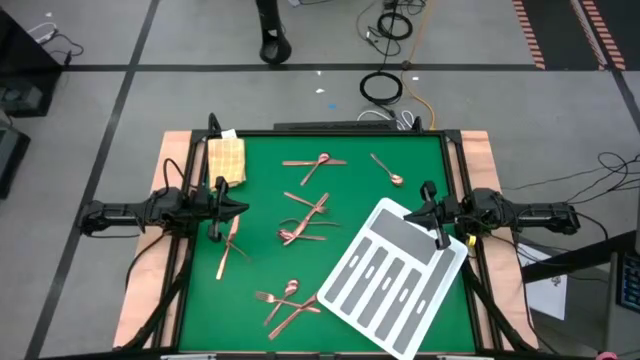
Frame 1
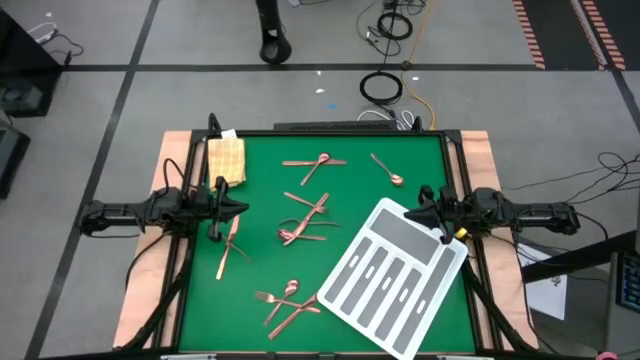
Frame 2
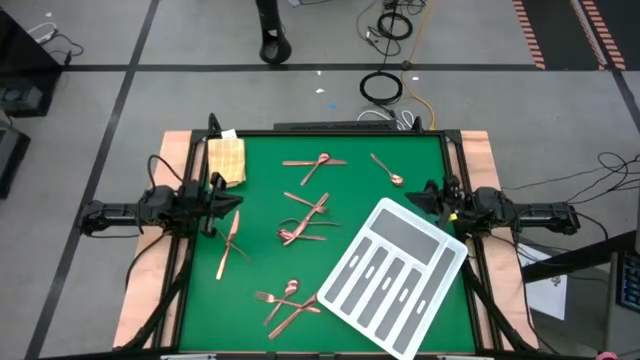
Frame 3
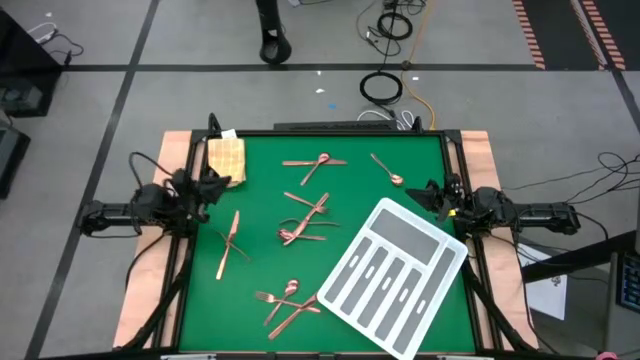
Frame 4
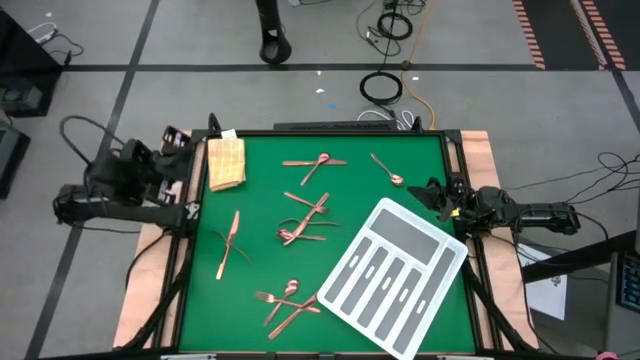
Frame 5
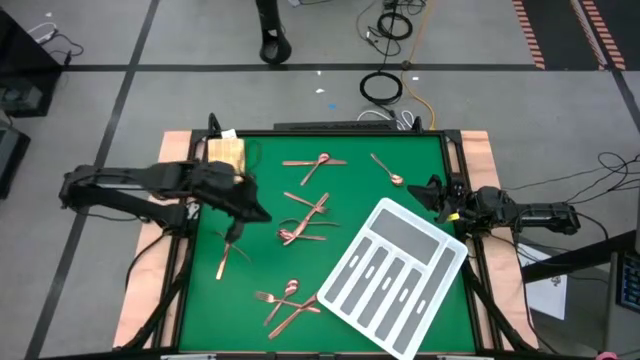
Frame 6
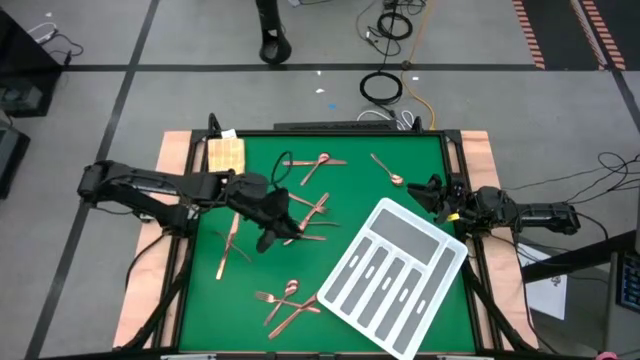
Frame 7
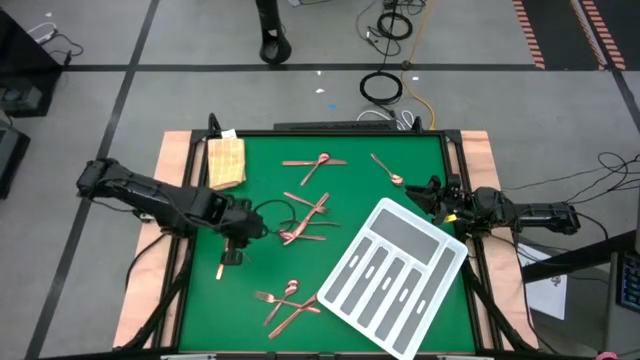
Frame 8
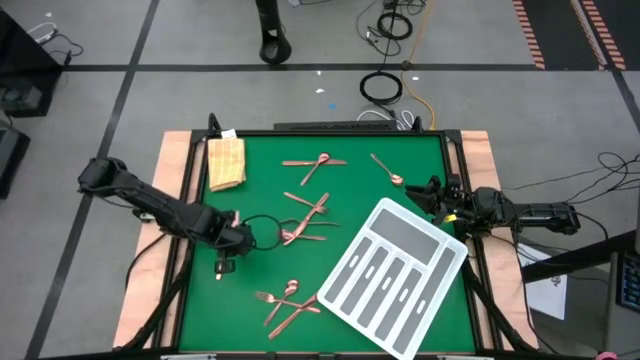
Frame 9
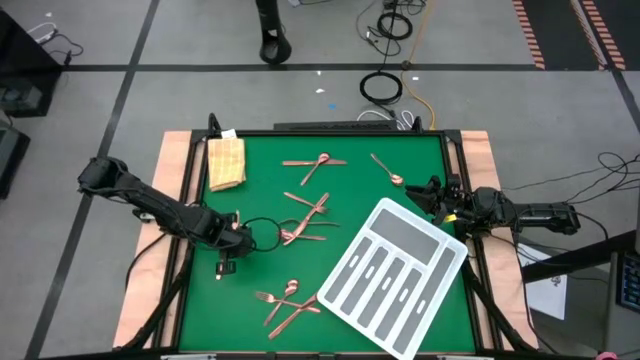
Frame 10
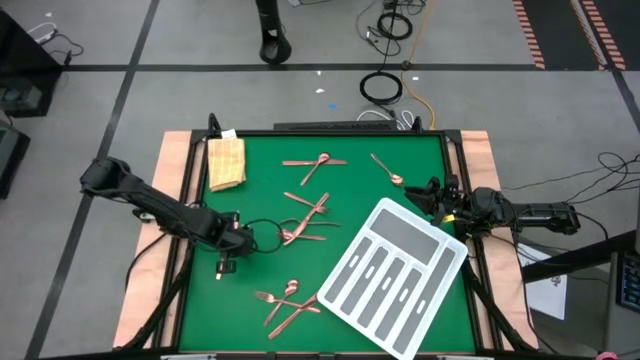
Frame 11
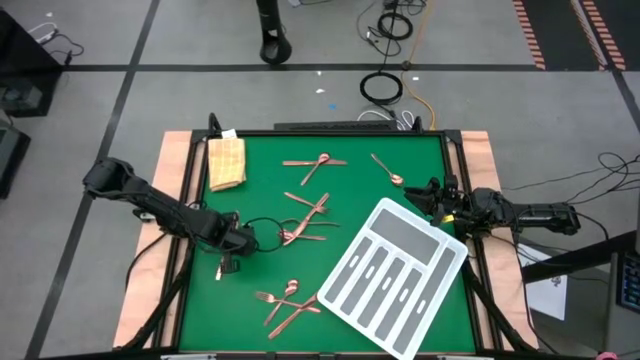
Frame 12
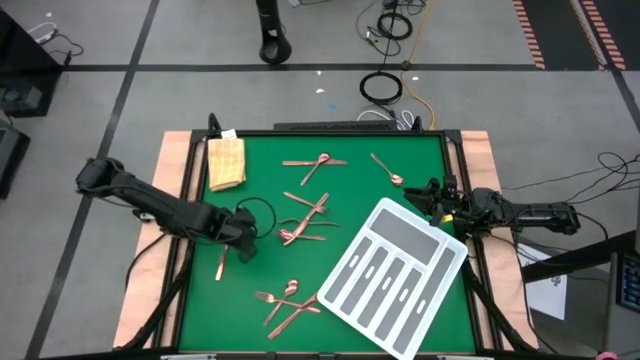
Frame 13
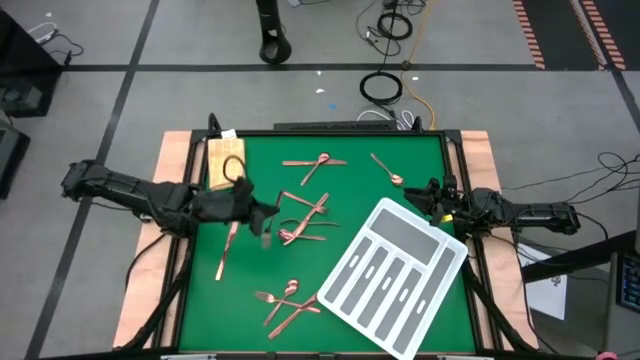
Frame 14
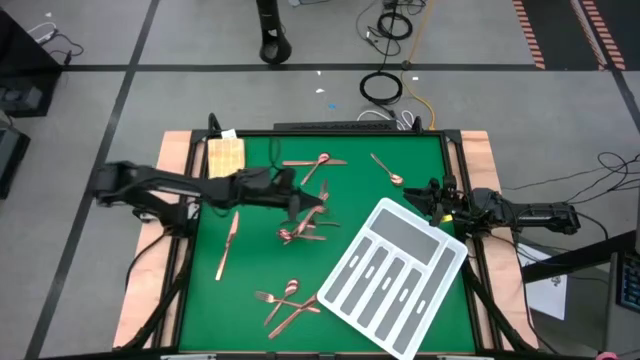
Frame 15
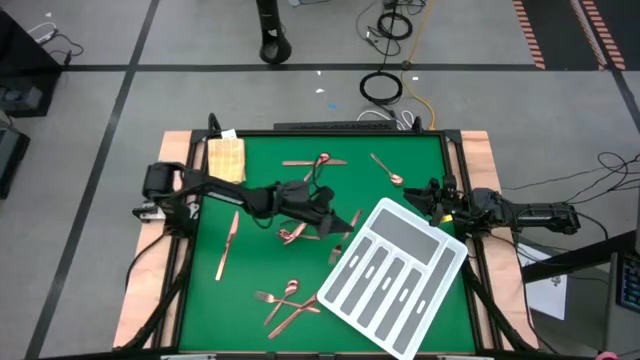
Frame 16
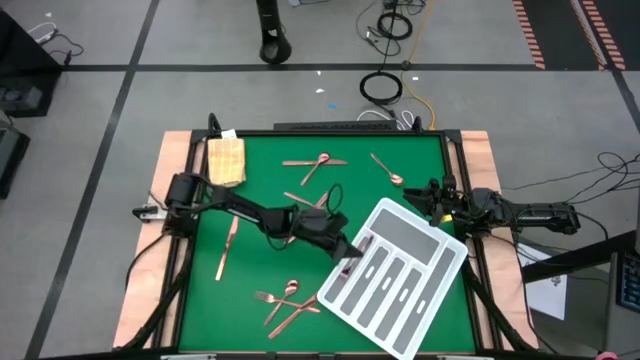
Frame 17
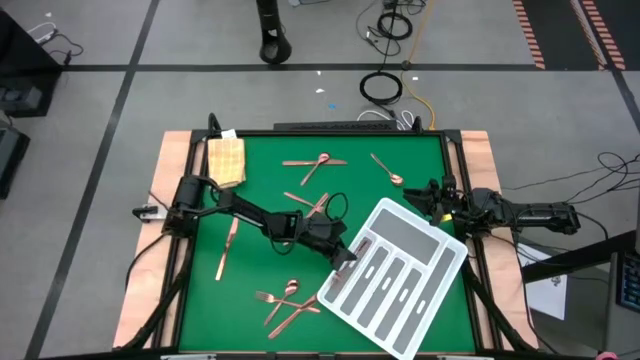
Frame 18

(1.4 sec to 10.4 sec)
Task: Sort silverware
Put the bronze fork into the silverware tray

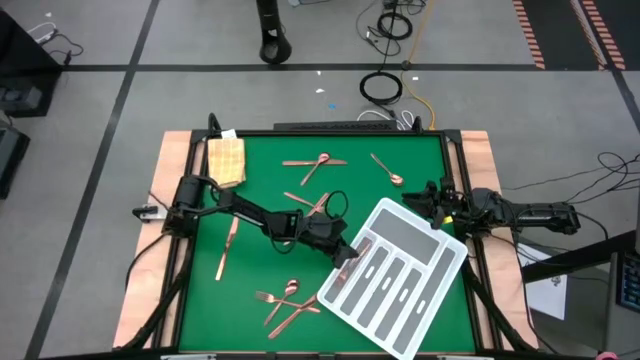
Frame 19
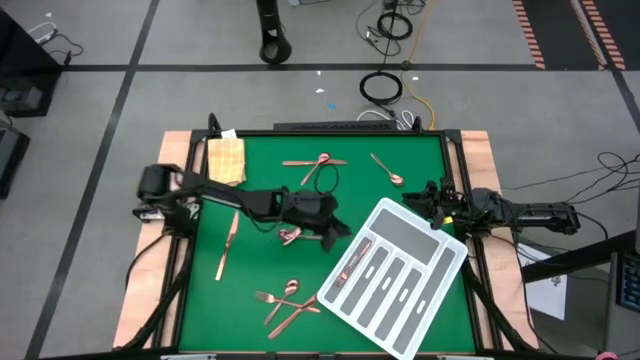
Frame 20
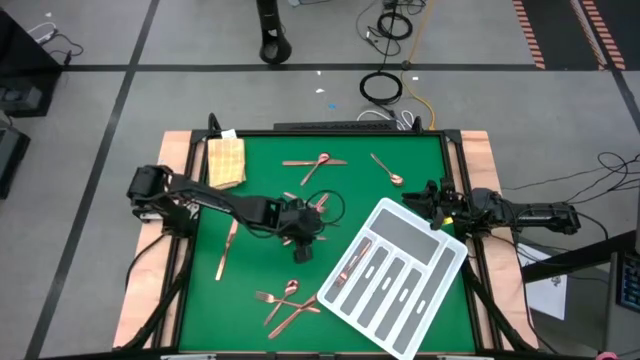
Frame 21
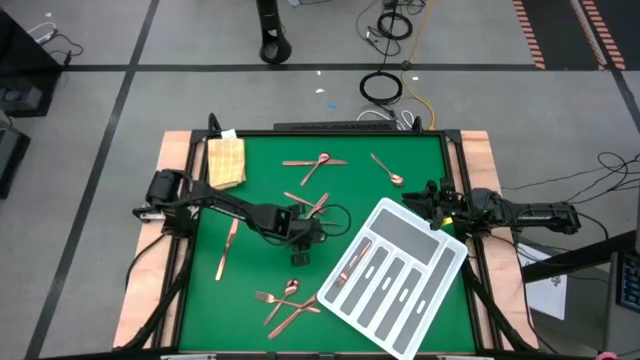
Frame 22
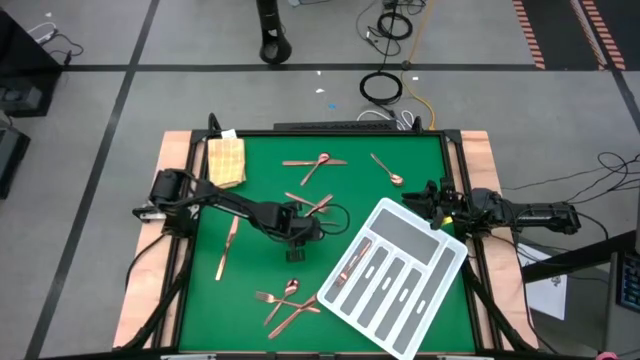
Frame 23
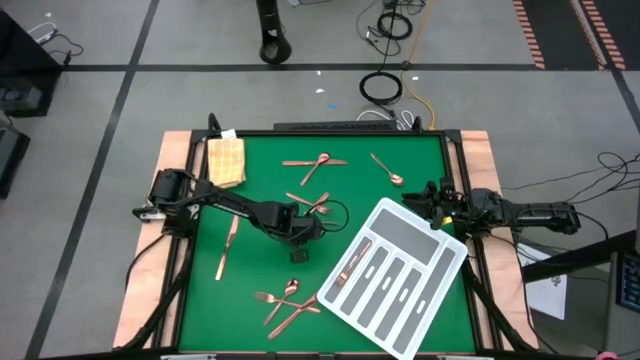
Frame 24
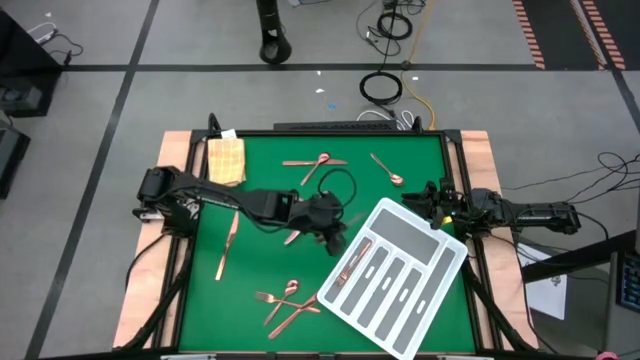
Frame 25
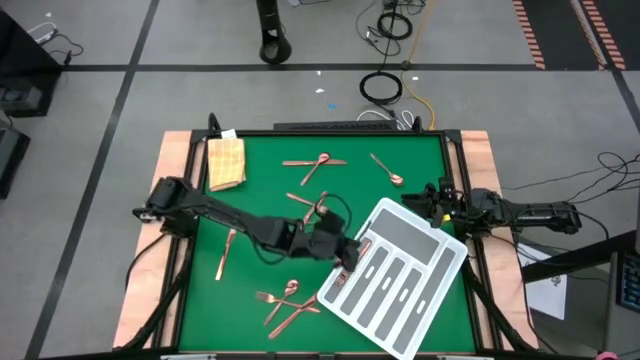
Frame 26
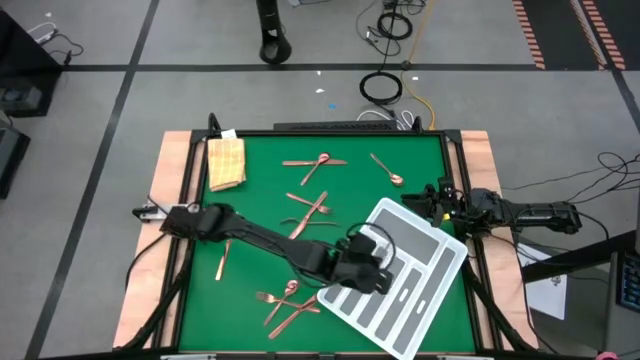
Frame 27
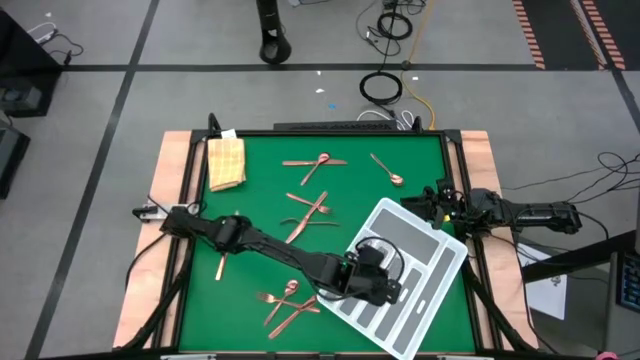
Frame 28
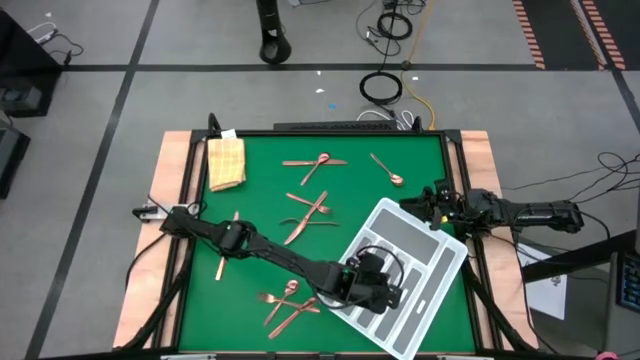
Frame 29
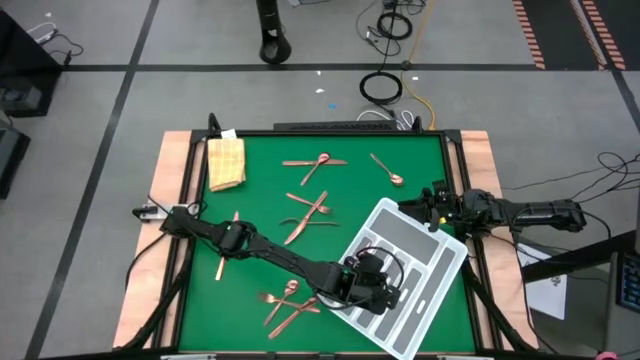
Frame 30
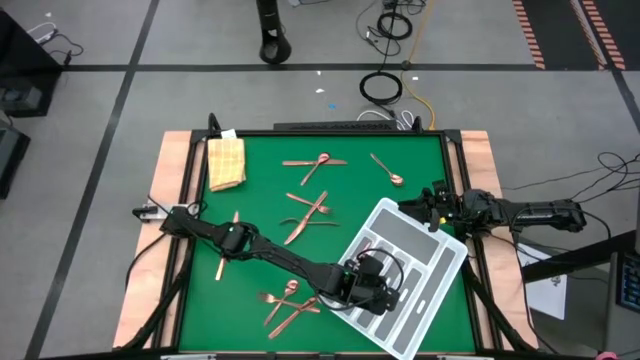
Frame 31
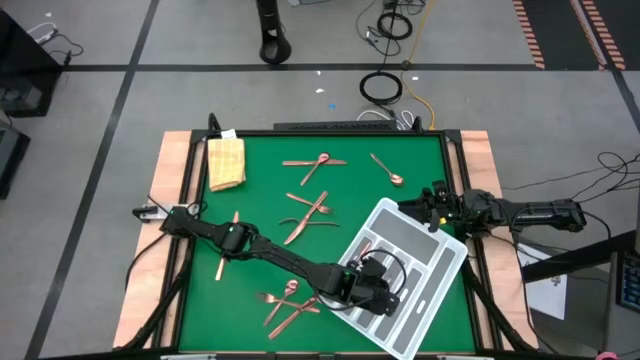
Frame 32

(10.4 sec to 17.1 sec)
Put the bronze spoon into the silverware tray

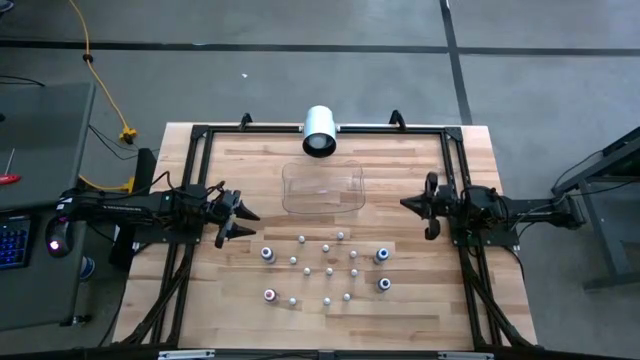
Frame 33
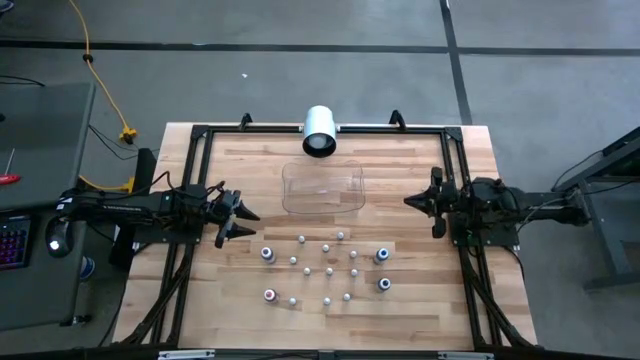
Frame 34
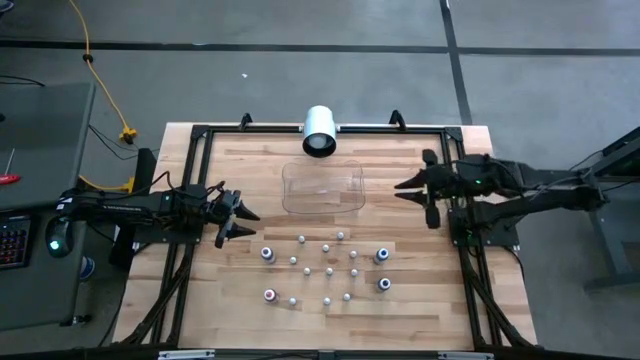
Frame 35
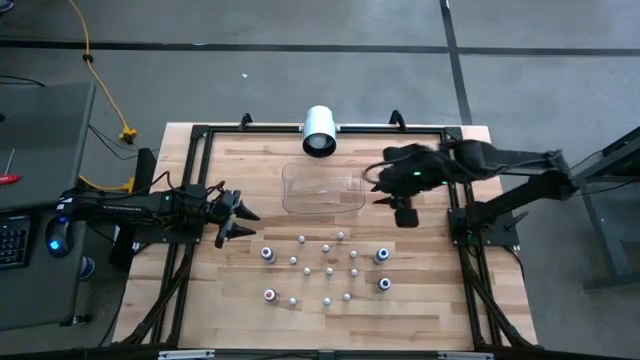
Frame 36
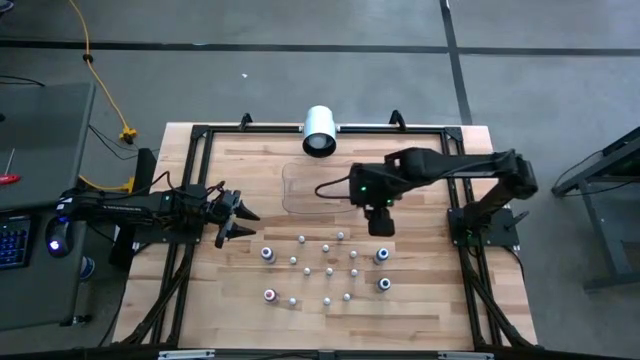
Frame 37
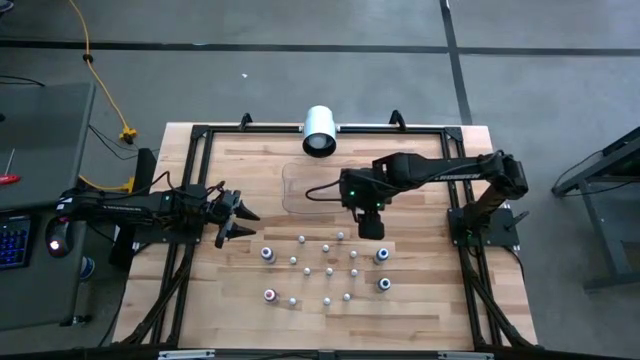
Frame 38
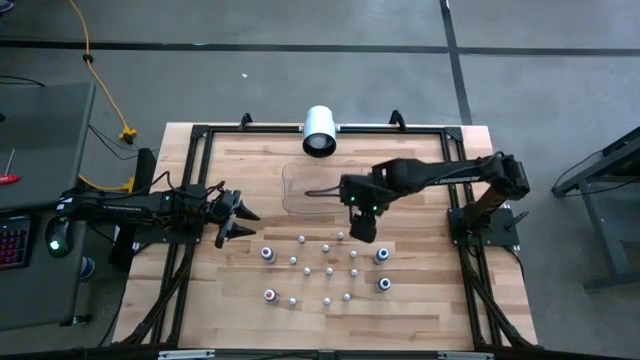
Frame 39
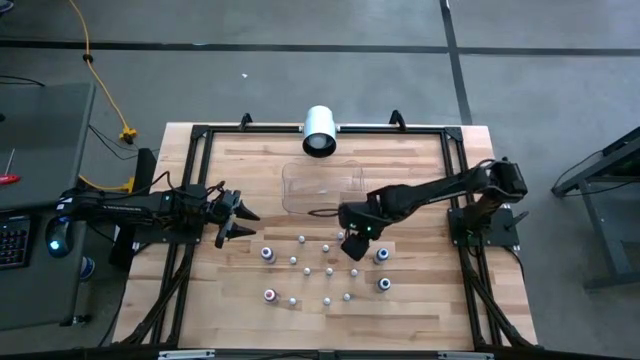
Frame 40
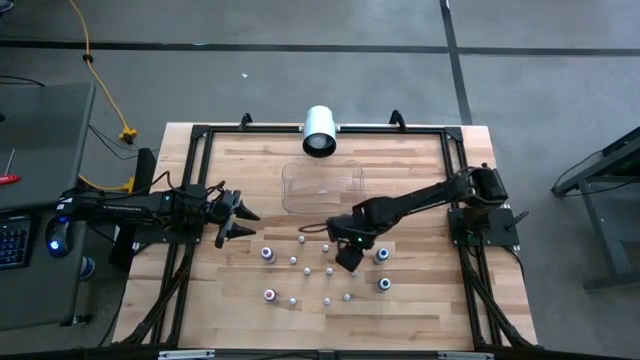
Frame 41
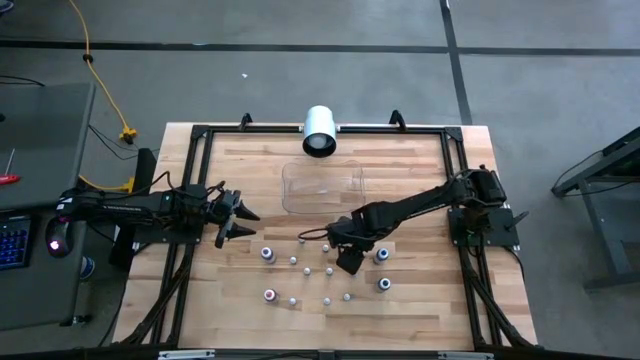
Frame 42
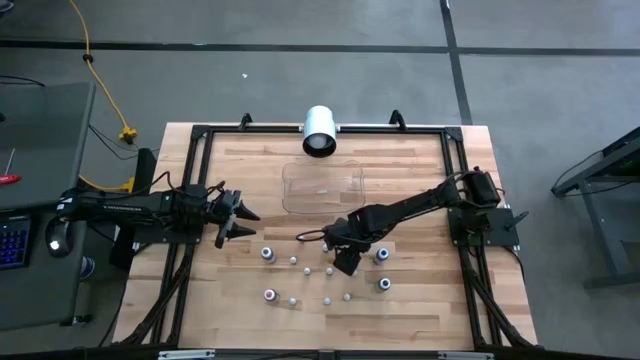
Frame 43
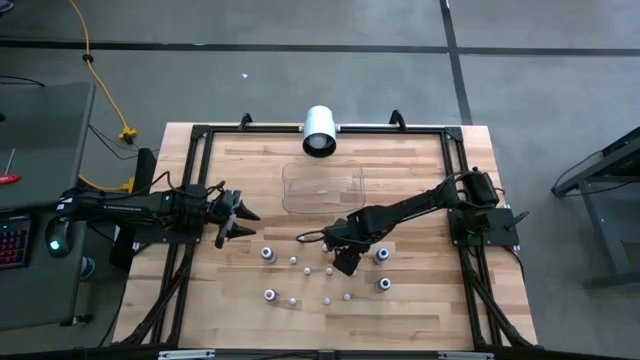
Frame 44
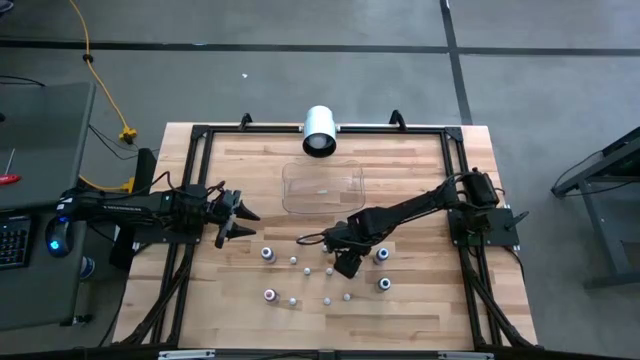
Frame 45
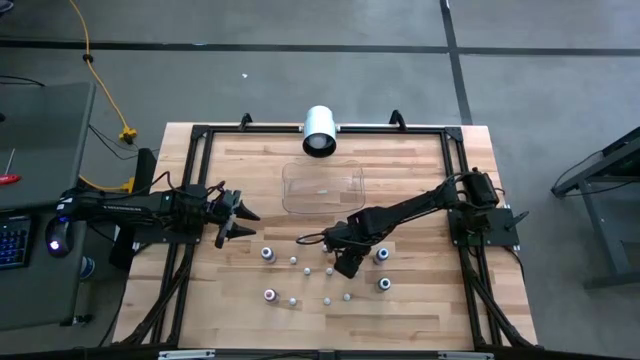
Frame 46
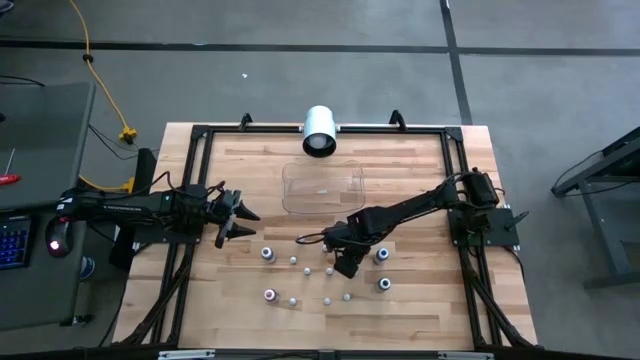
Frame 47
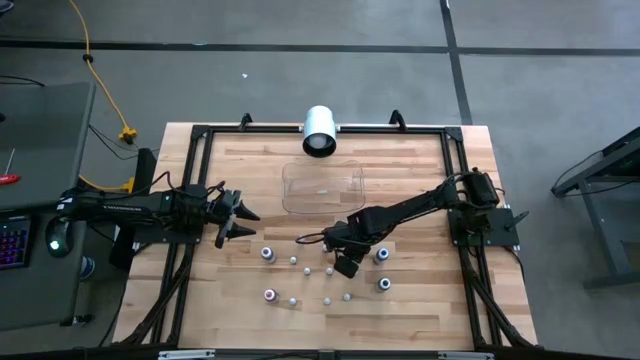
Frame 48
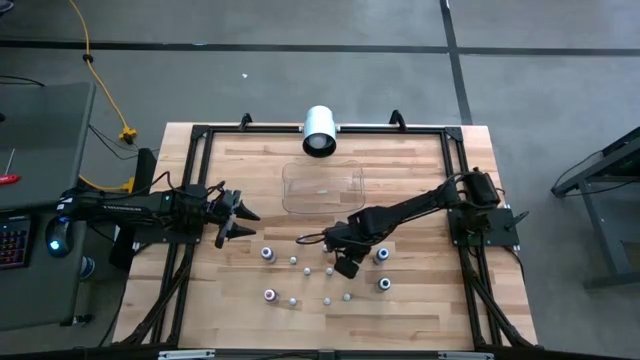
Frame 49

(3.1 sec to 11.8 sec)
Task: Pick & Place food coloring
Put the small green food coloring bottle into the transparent bin
